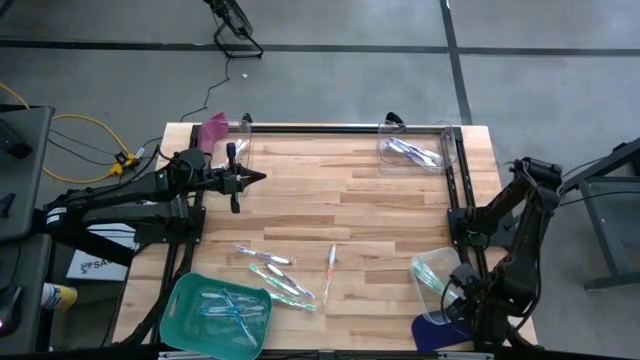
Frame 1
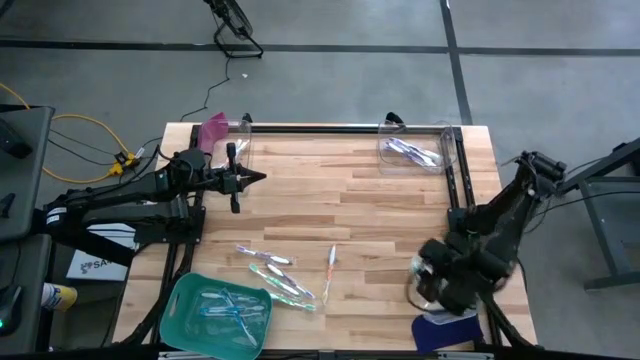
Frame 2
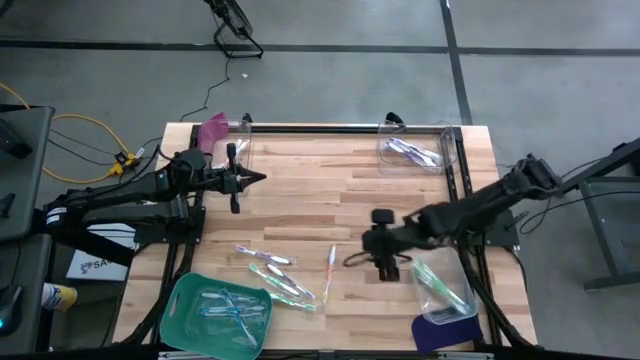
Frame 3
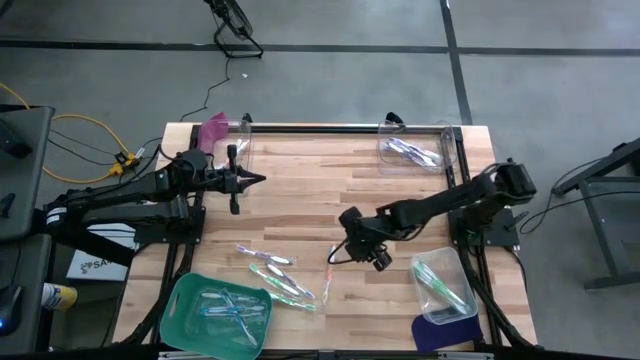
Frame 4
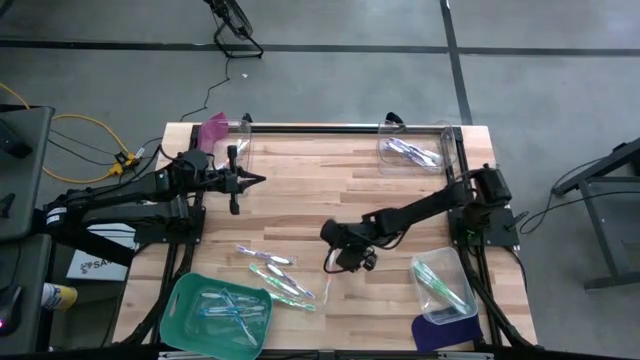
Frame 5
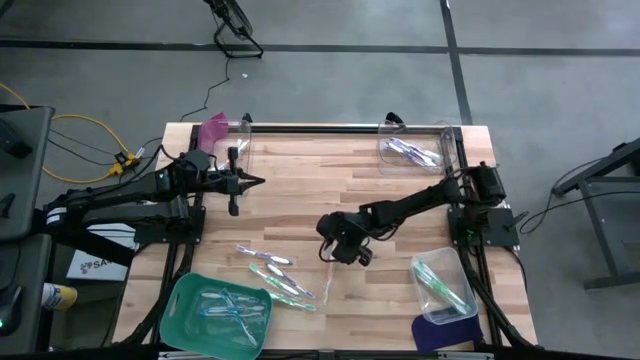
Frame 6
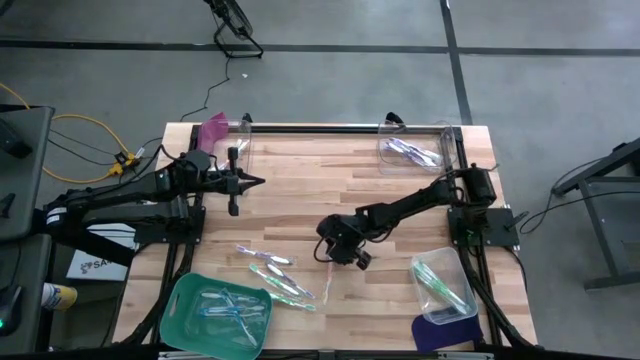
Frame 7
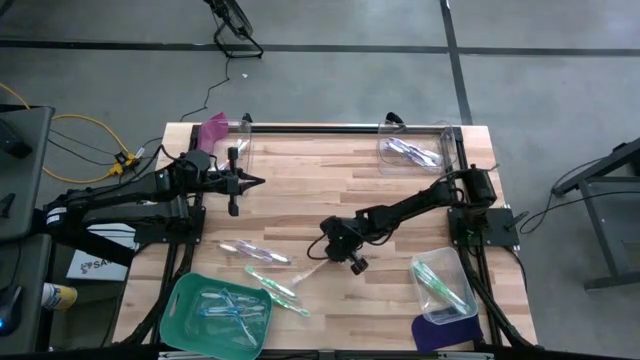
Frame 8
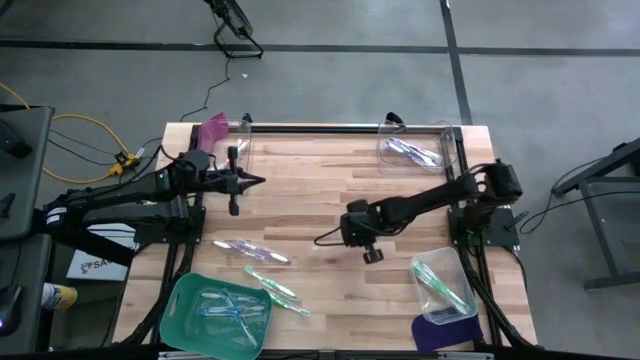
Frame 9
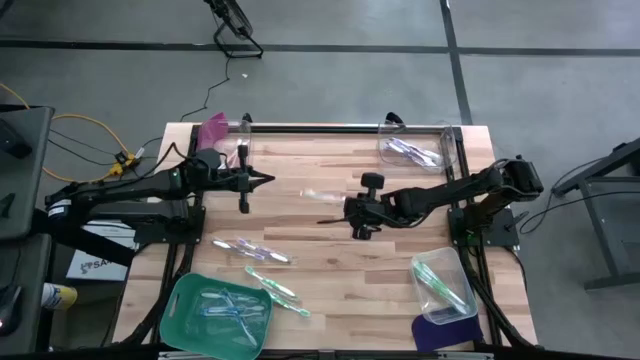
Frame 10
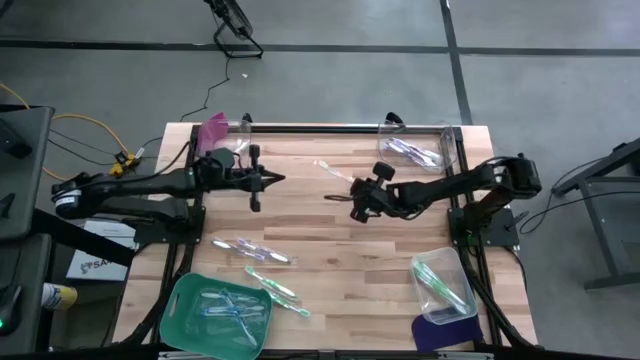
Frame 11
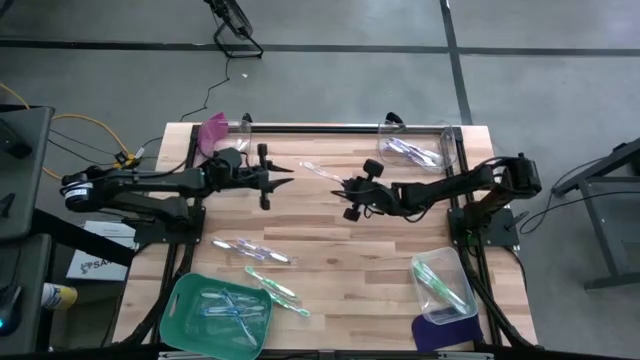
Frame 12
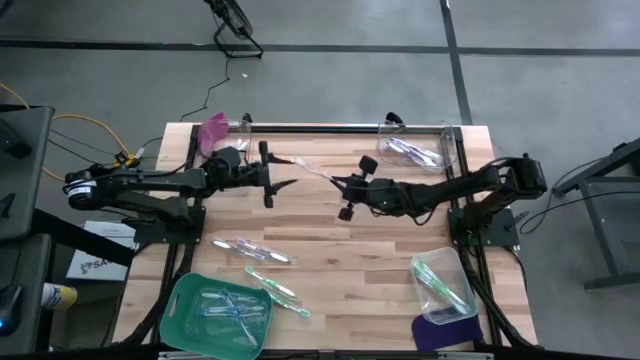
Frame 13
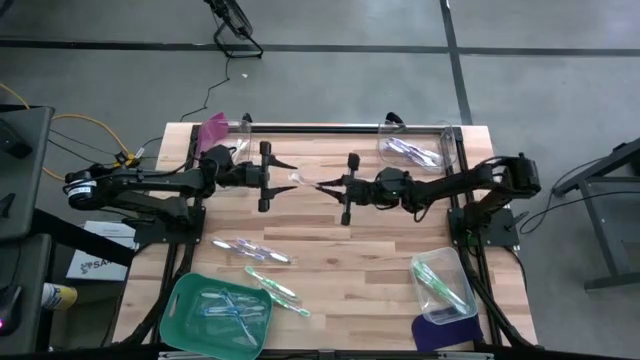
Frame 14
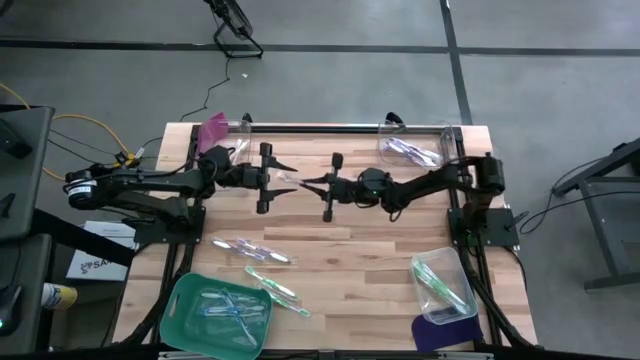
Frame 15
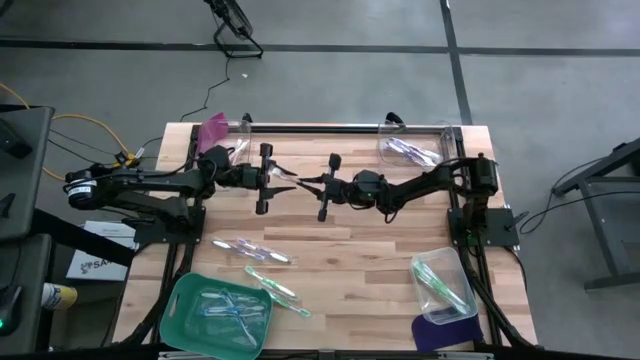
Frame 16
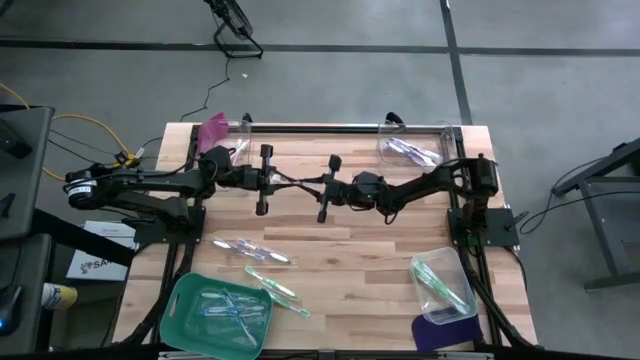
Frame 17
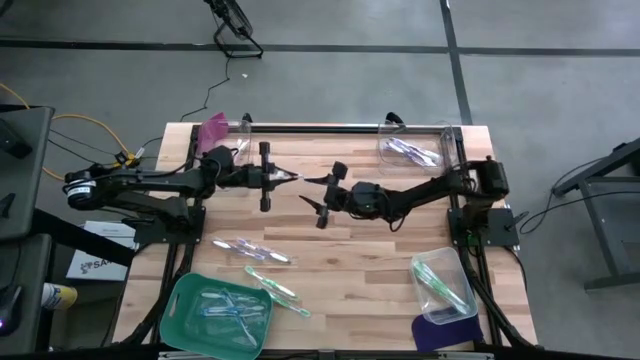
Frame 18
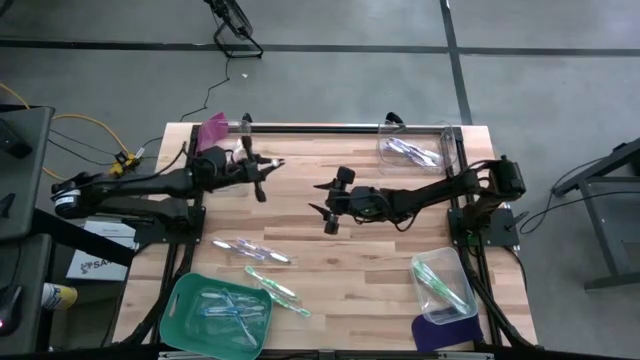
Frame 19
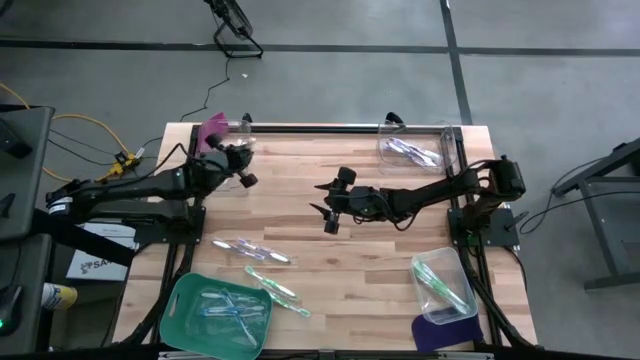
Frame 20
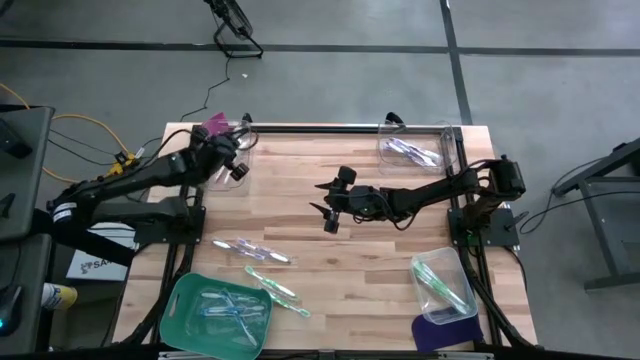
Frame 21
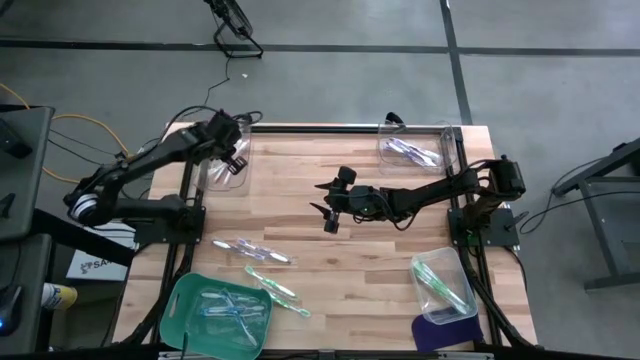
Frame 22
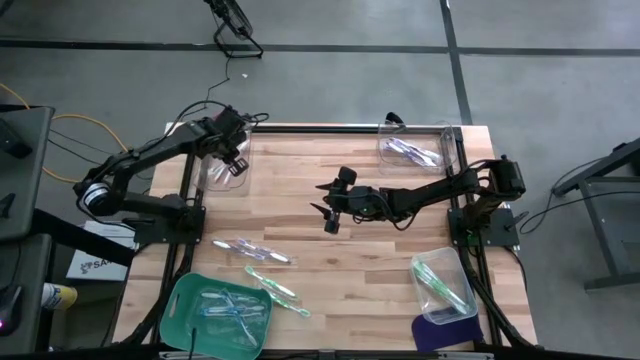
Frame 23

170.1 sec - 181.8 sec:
Task: Pick & Place Toothbrushes
Put the orange toothbrush into the left transparent bin

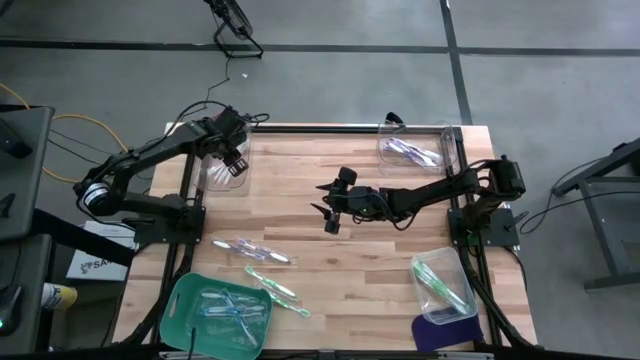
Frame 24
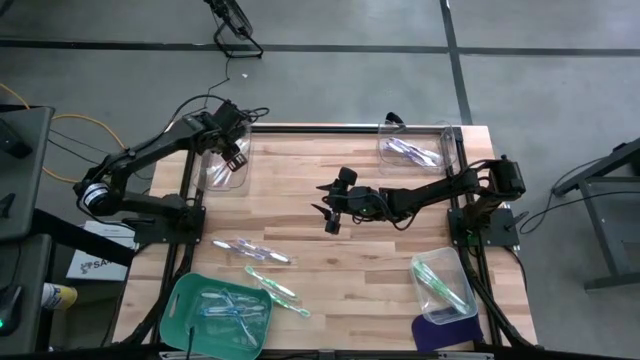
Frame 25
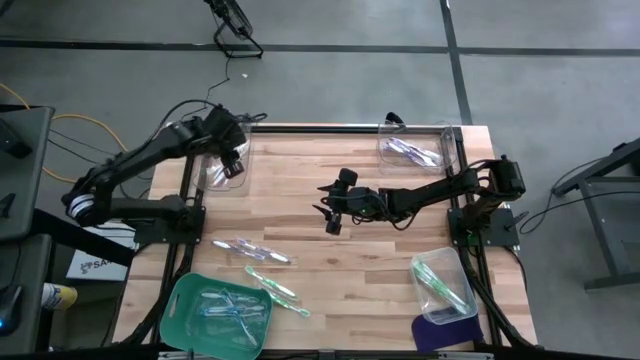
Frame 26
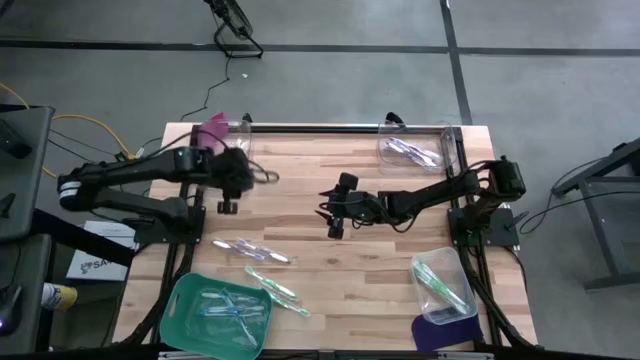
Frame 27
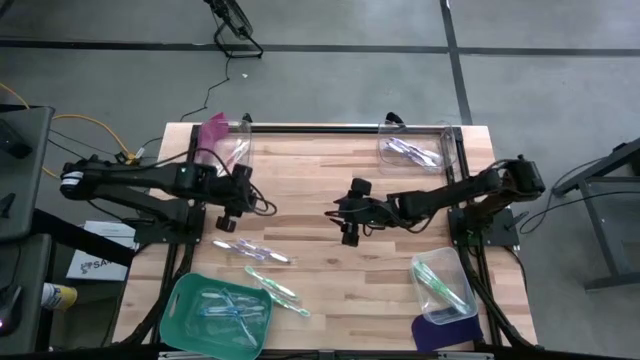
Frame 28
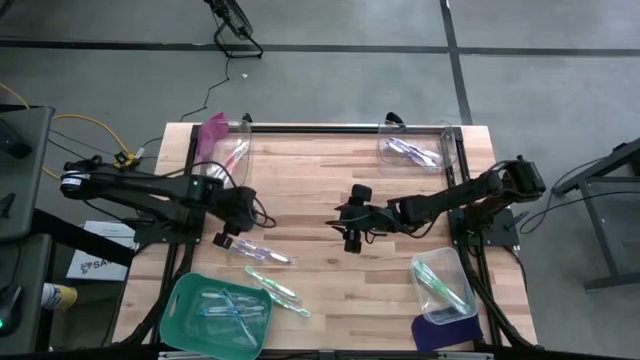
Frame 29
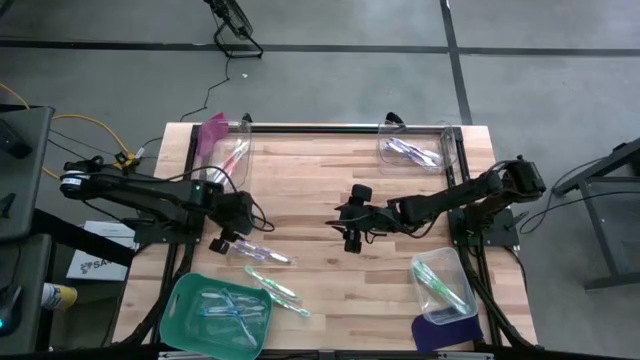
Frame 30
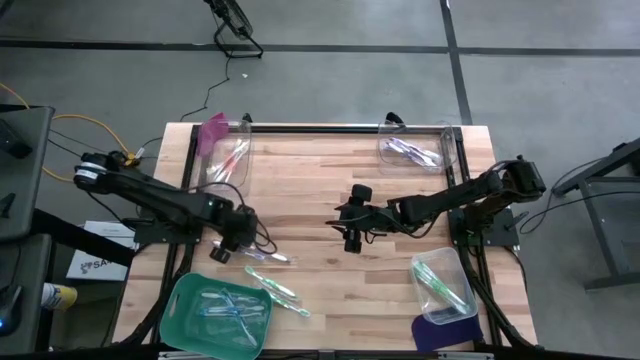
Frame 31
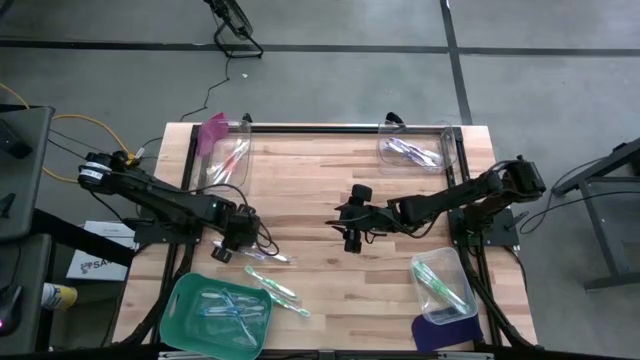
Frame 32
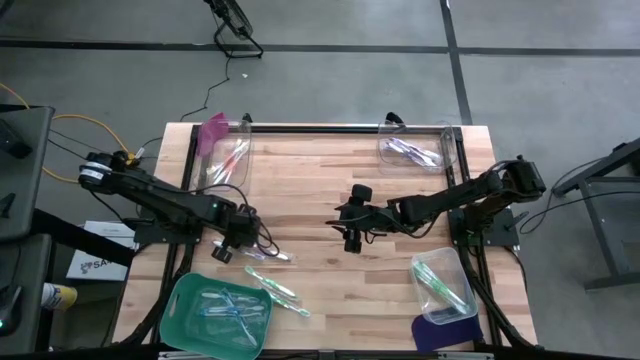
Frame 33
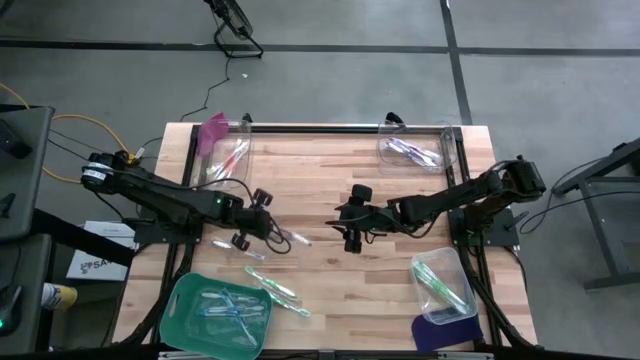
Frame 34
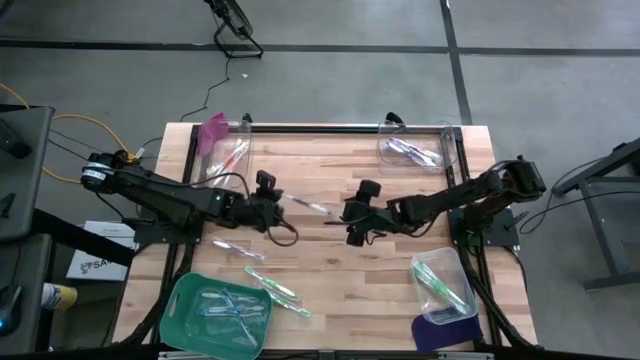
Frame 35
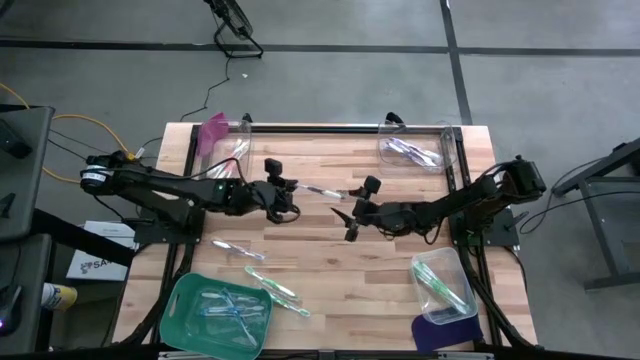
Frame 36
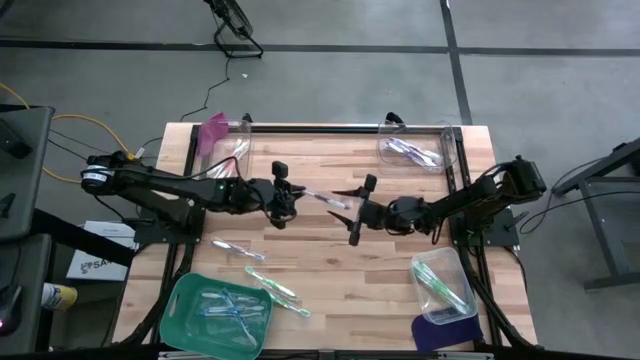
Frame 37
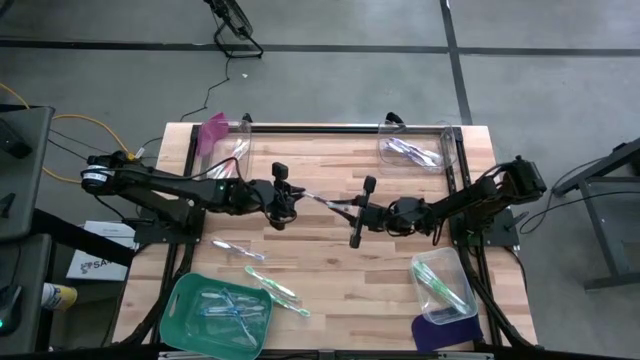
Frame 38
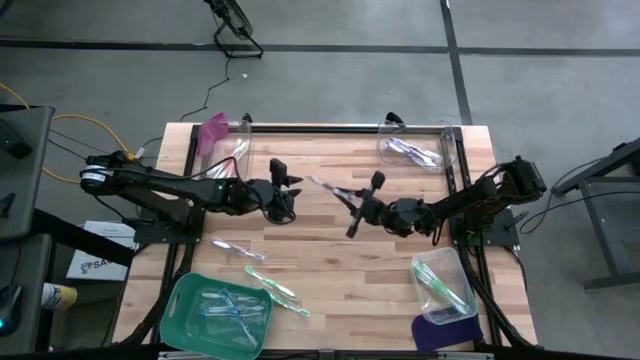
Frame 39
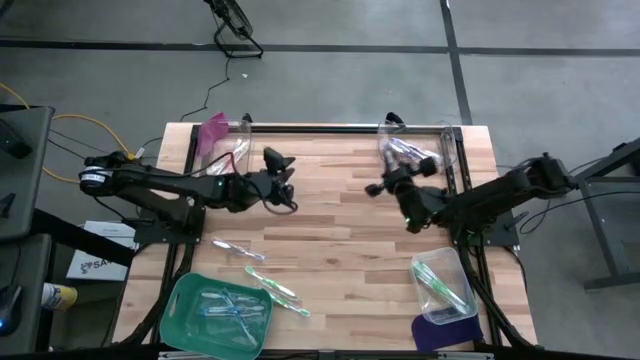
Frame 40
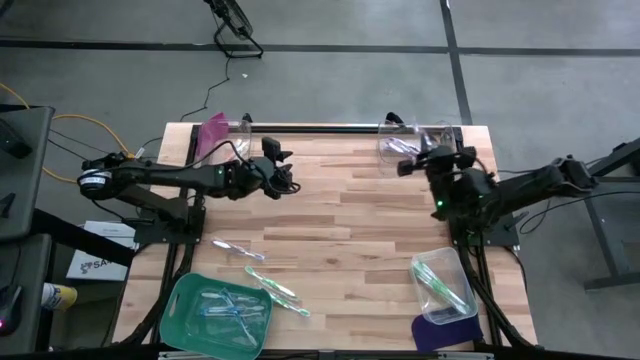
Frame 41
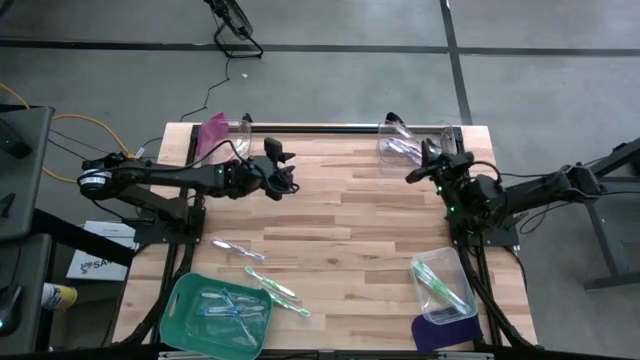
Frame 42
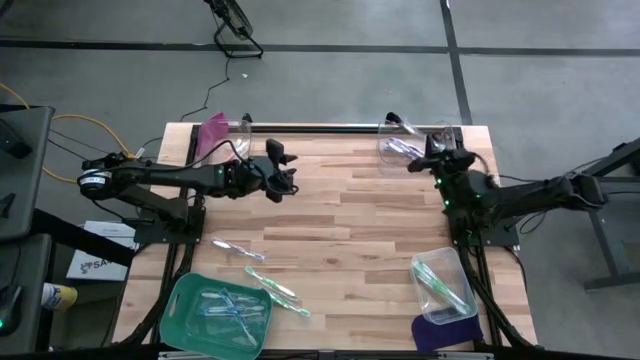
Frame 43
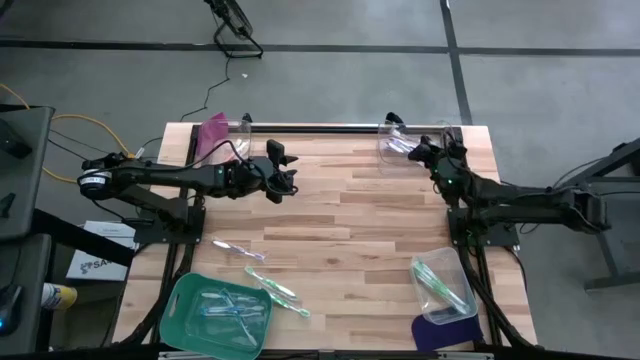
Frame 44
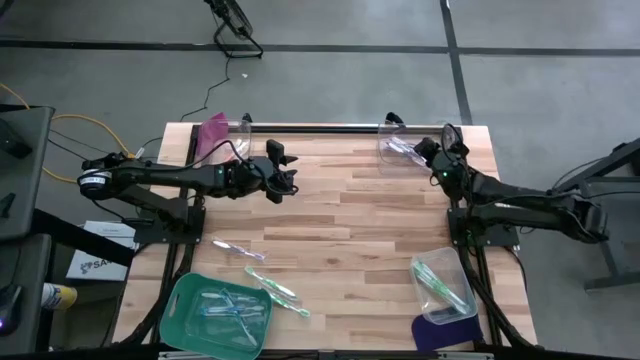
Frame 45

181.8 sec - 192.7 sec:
Put the purple toothbrush into the right transparent bin
